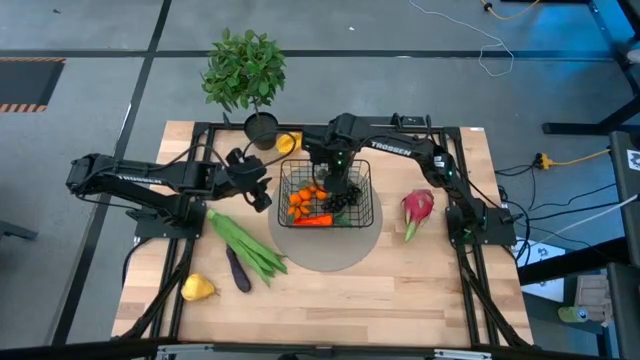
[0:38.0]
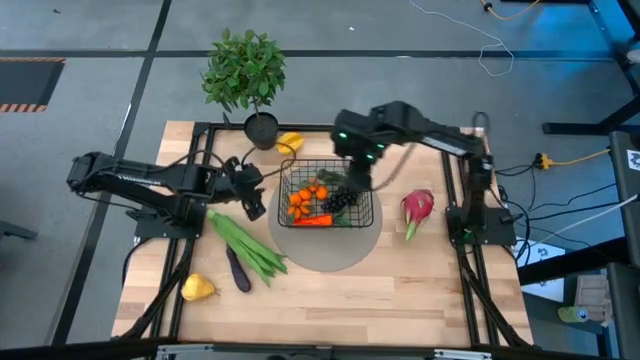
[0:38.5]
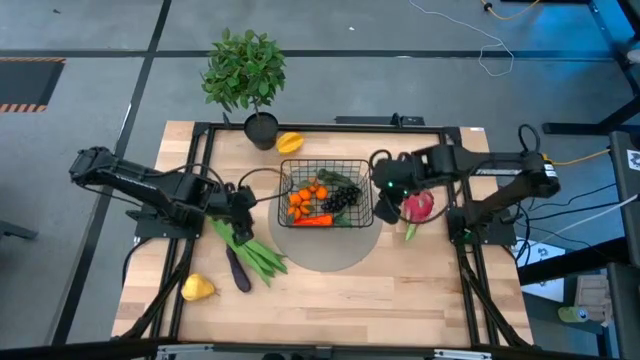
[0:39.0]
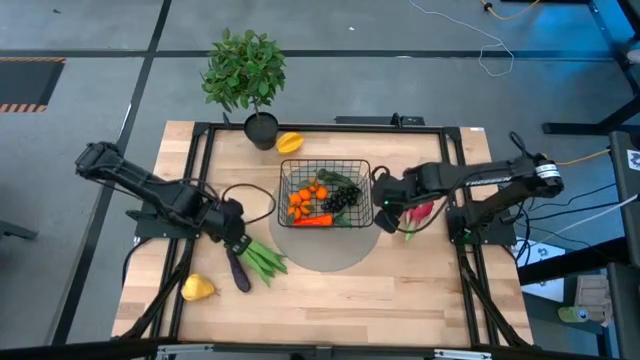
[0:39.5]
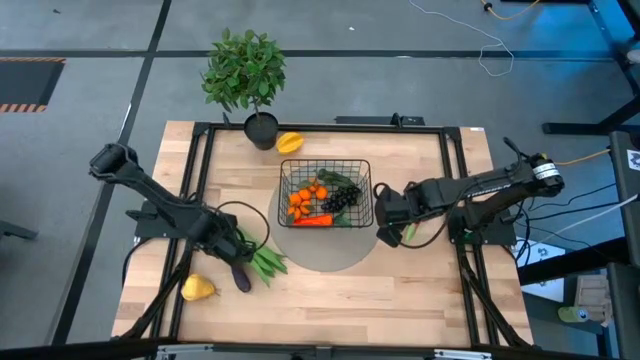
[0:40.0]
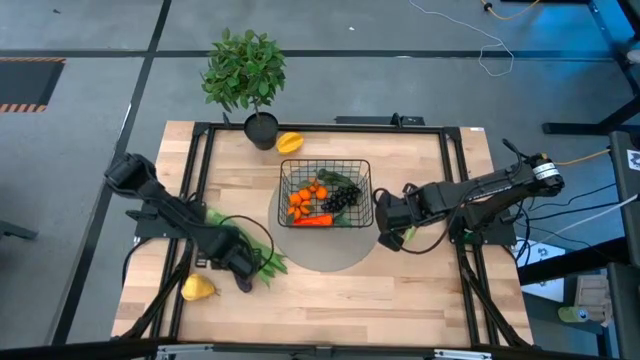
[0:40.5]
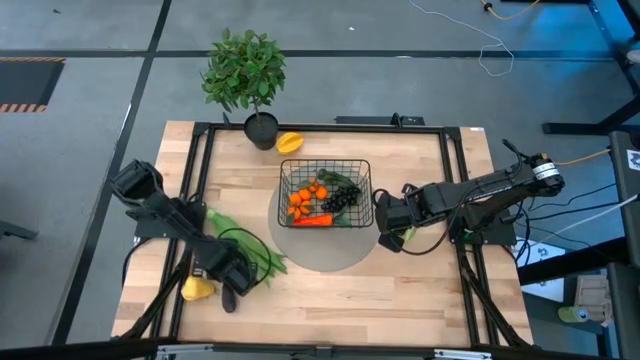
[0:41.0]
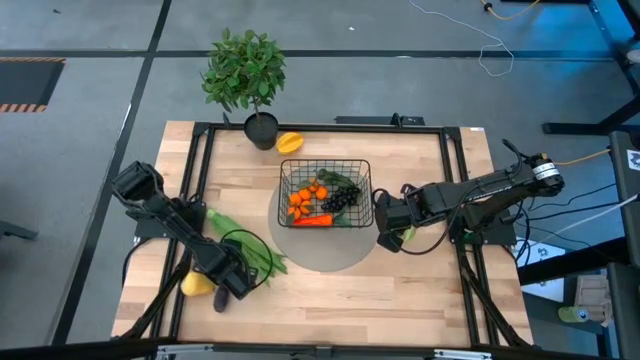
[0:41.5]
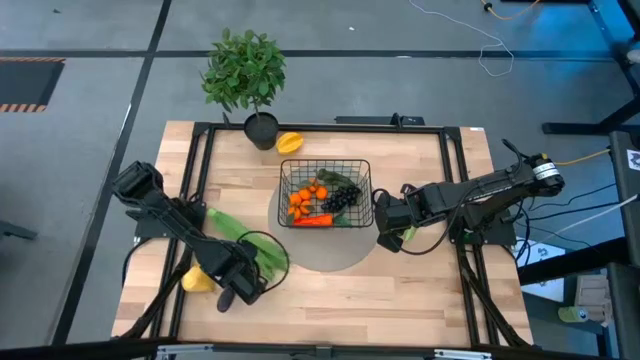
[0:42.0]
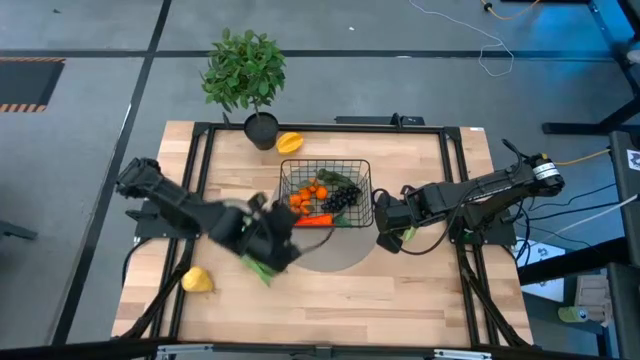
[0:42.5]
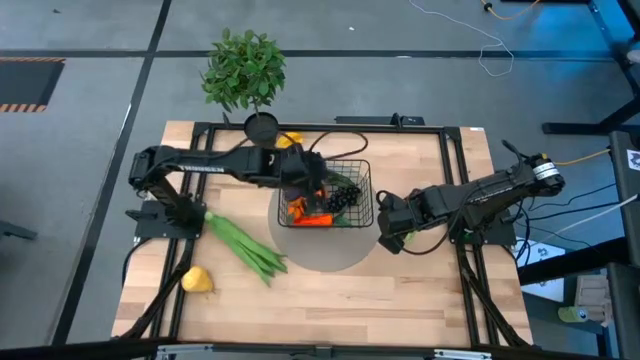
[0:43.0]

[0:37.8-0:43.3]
Task: Build produce basket
Put the eggplant into the black wire basket

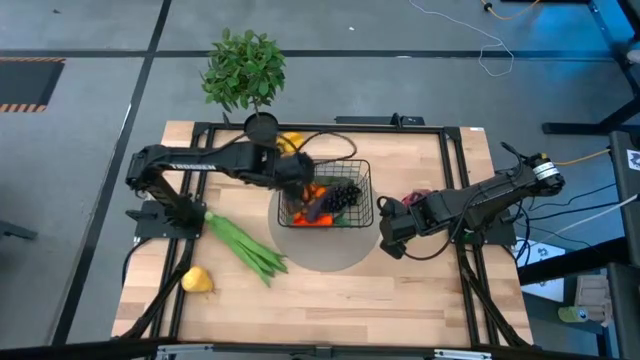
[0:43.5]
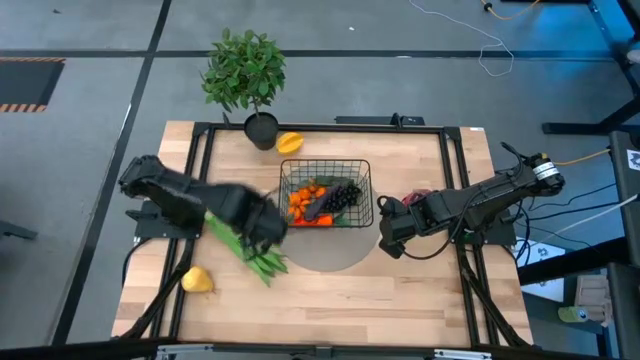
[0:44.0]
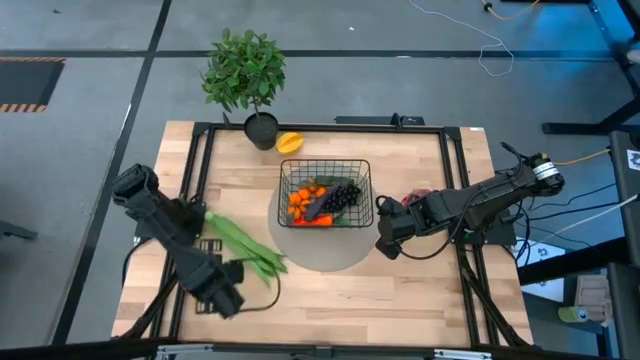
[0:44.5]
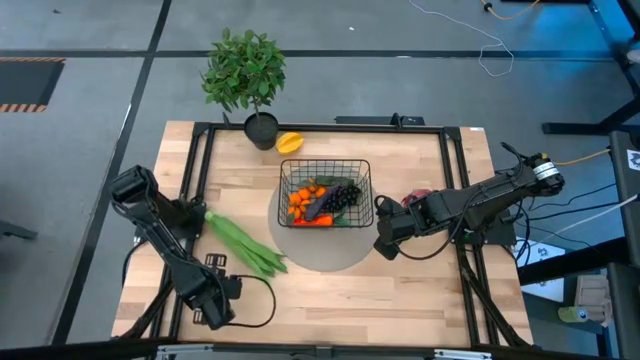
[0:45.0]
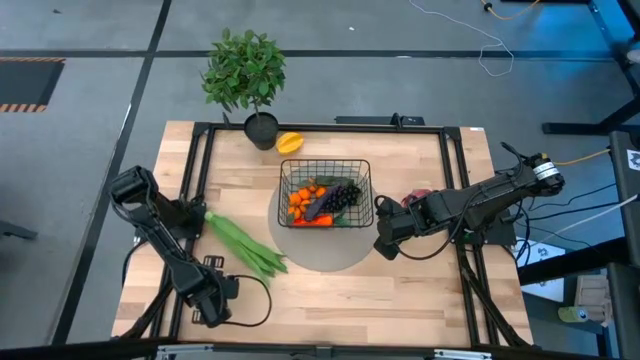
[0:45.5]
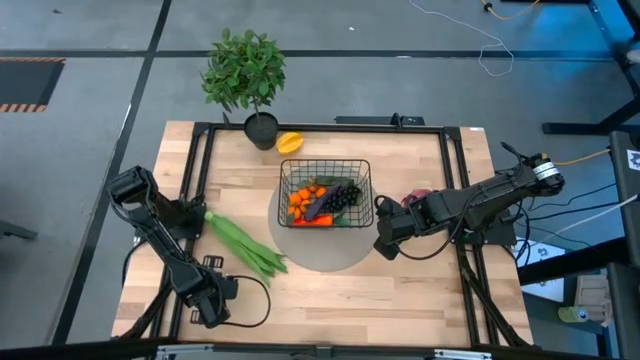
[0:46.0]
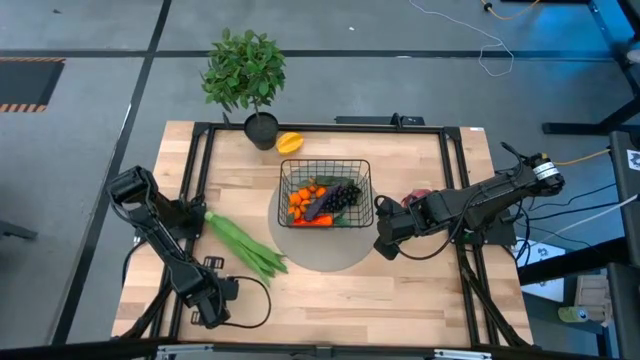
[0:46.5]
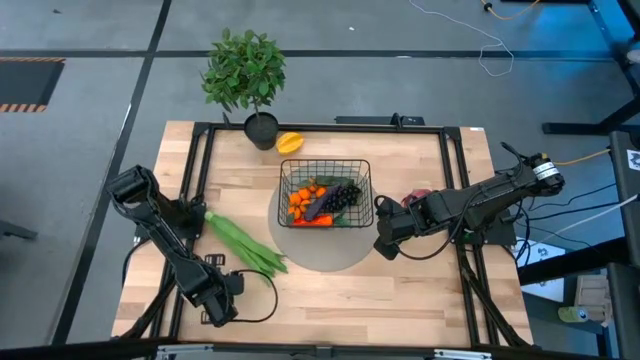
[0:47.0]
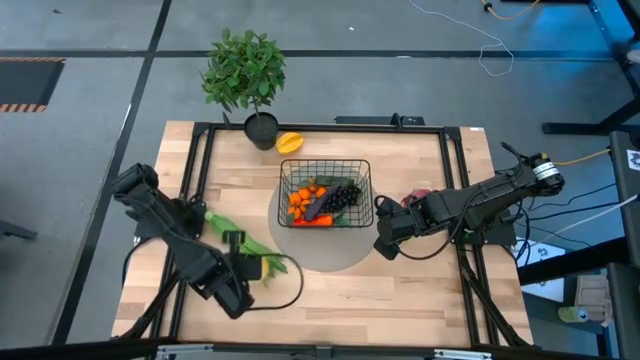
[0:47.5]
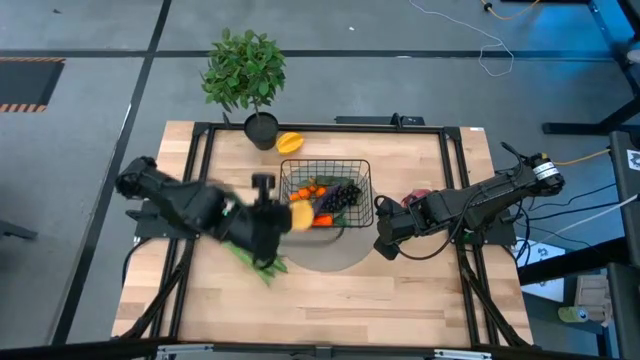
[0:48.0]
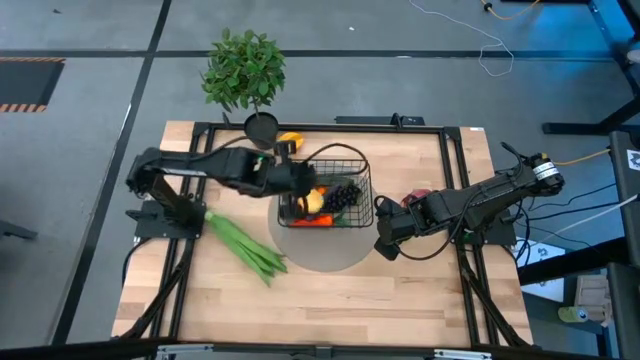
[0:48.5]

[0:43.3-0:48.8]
Put the pear into the black wire basket

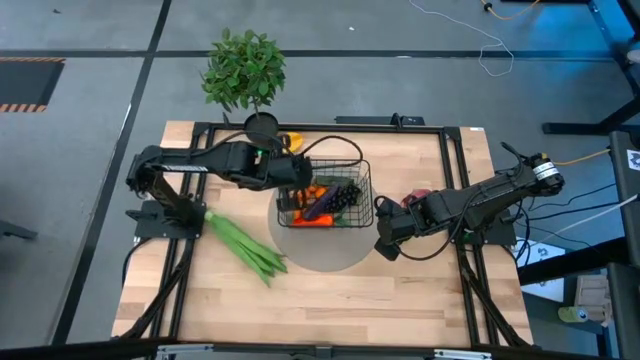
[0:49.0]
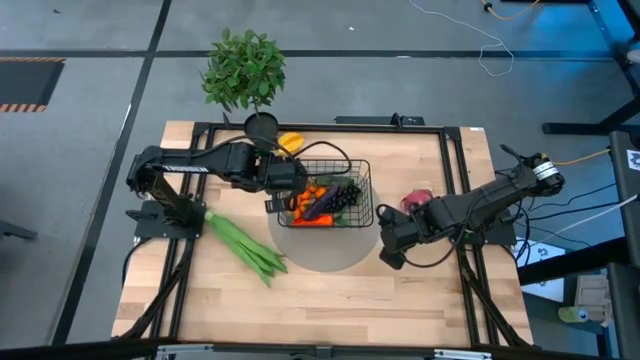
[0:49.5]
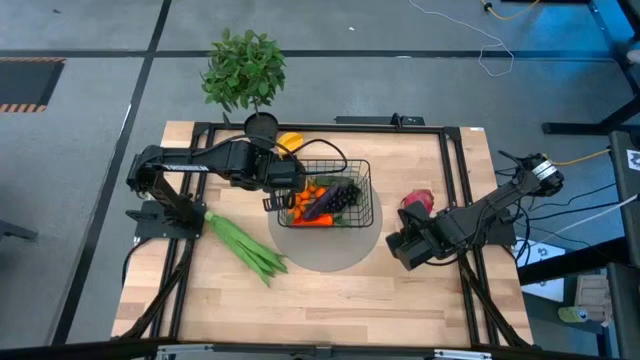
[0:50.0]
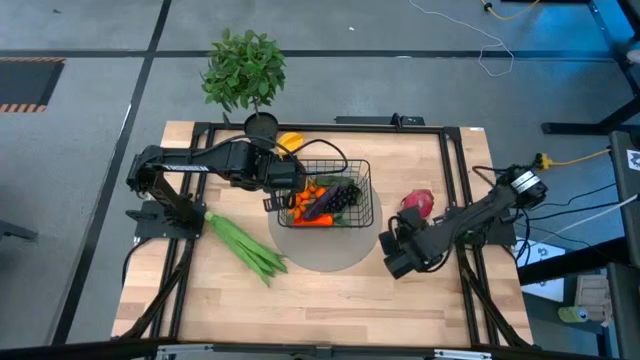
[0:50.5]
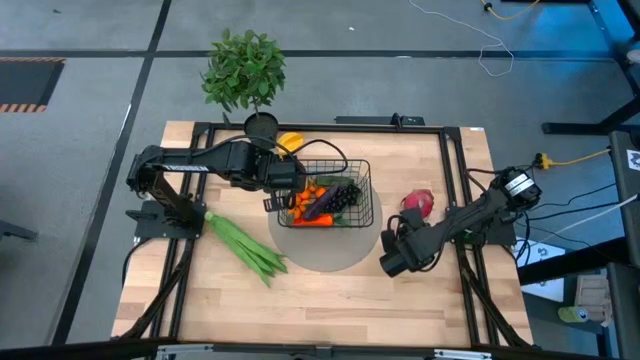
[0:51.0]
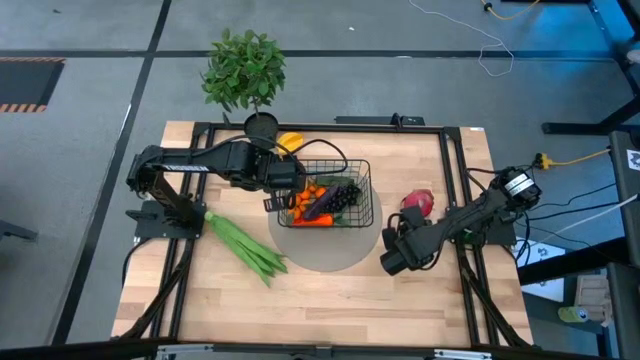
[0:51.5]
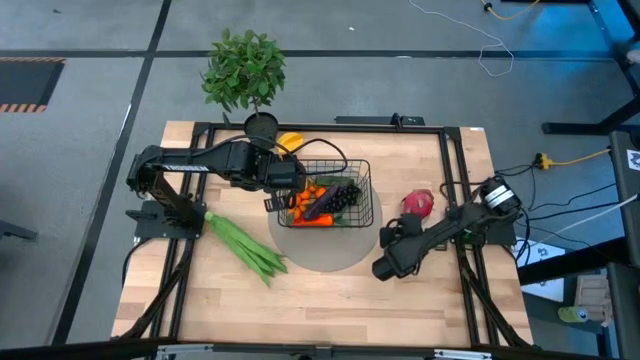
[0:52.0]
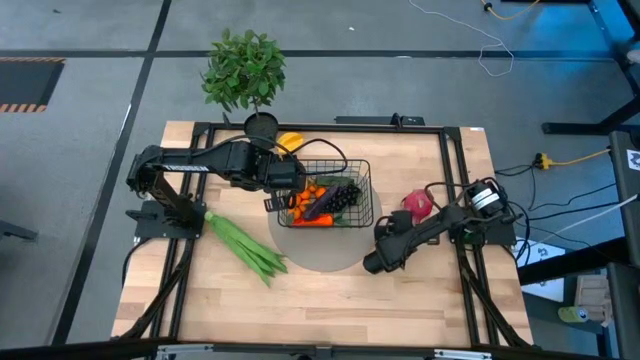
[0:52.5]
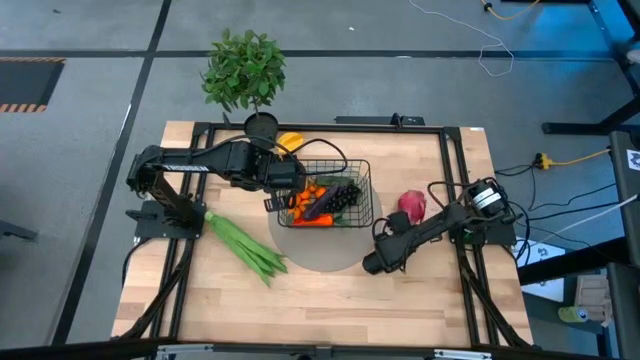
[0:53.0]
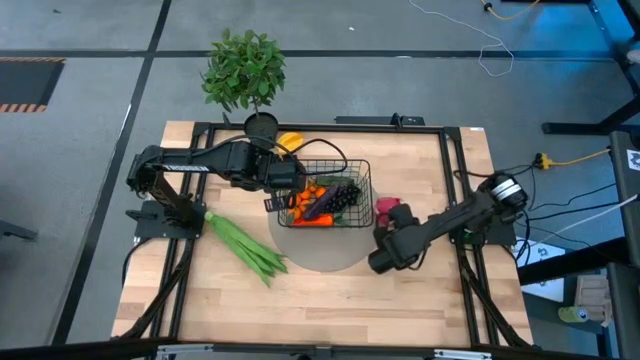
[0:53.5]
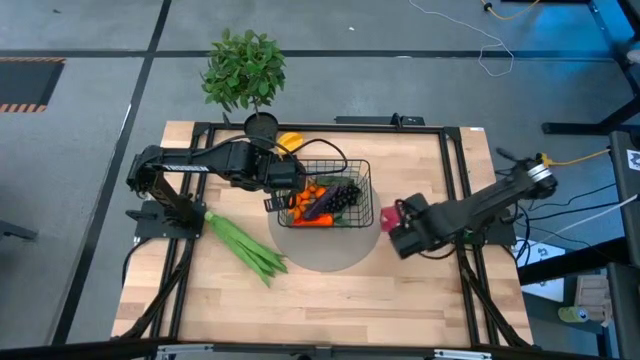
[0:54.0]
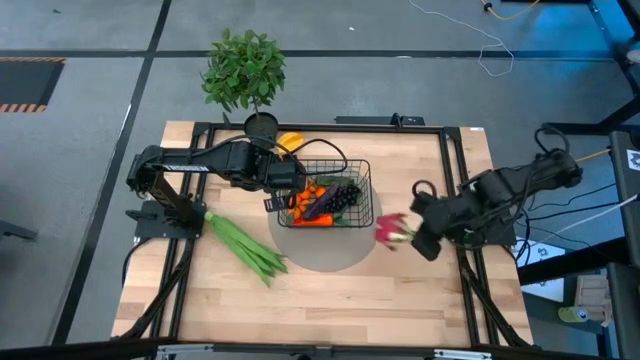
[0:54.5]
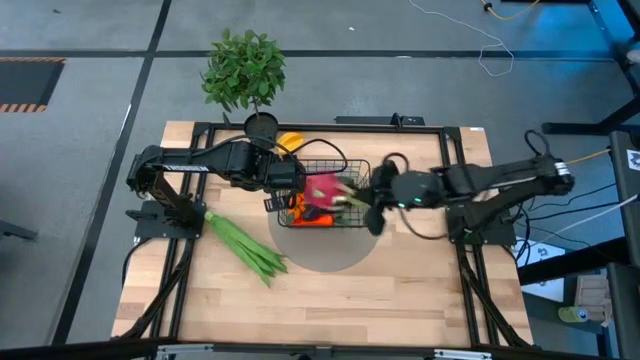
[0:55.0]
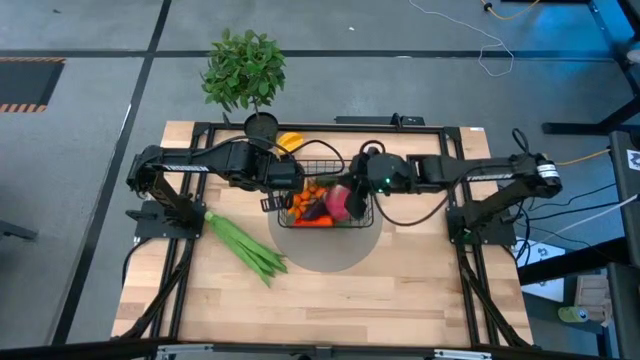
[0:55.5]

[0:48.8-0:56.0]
Put the dragon fruit into the black wire basket

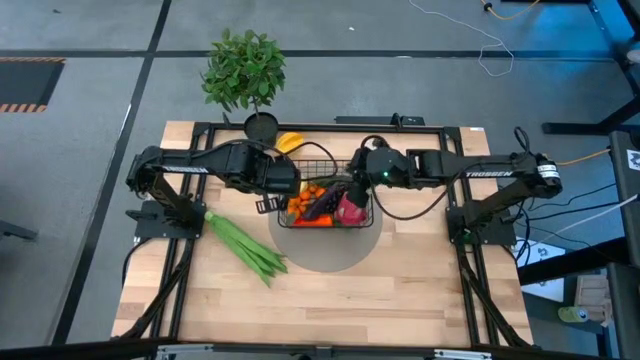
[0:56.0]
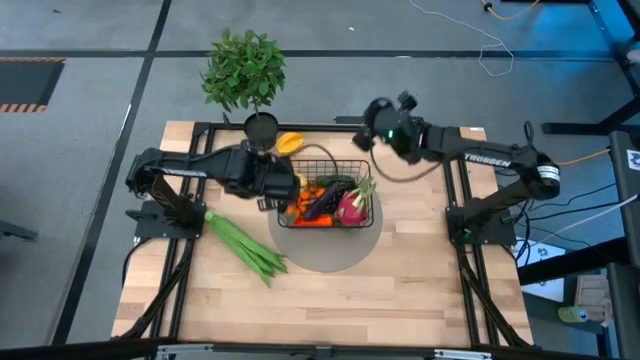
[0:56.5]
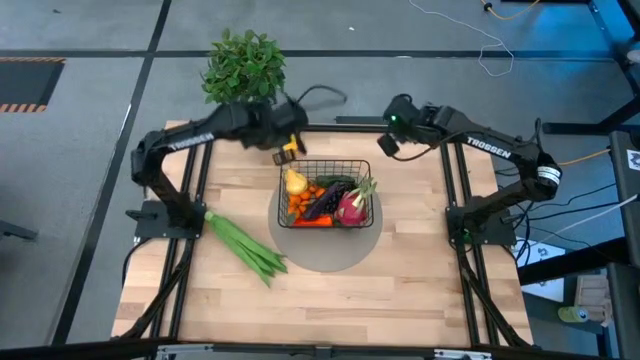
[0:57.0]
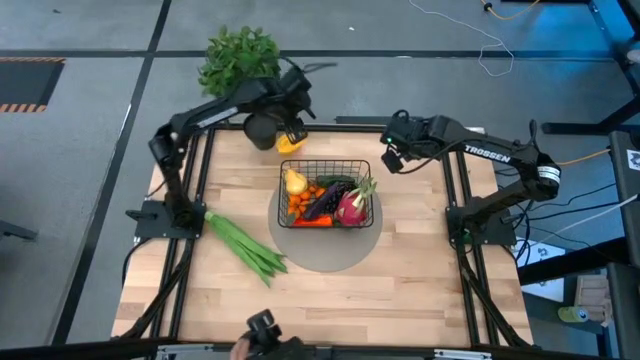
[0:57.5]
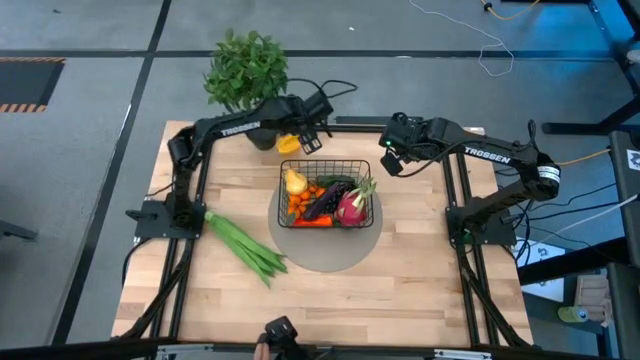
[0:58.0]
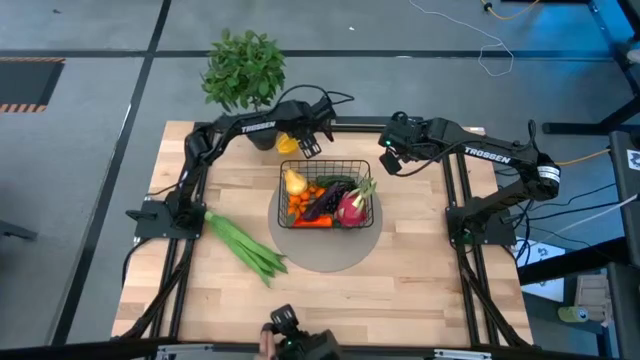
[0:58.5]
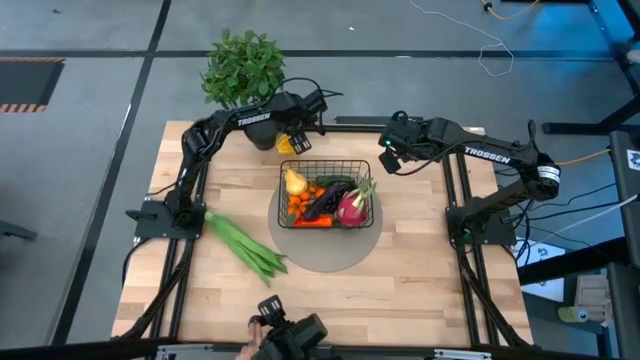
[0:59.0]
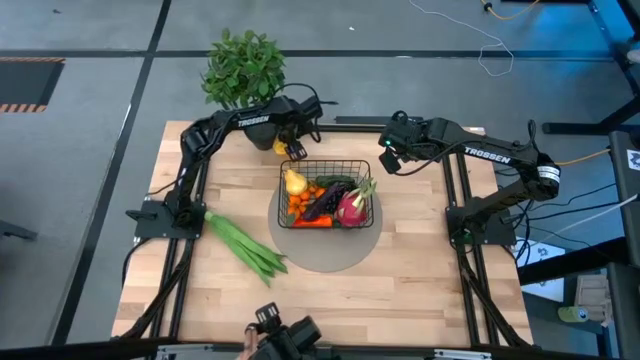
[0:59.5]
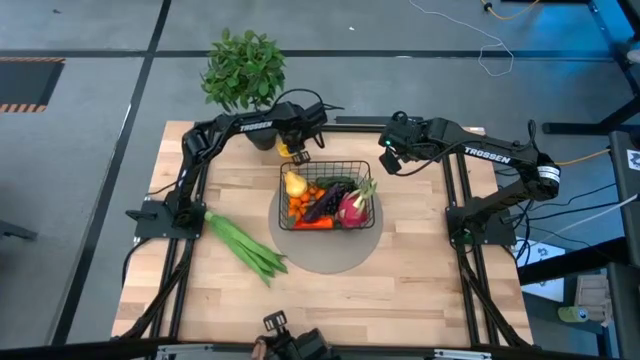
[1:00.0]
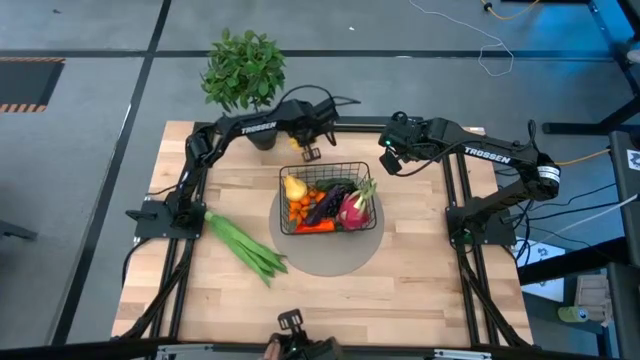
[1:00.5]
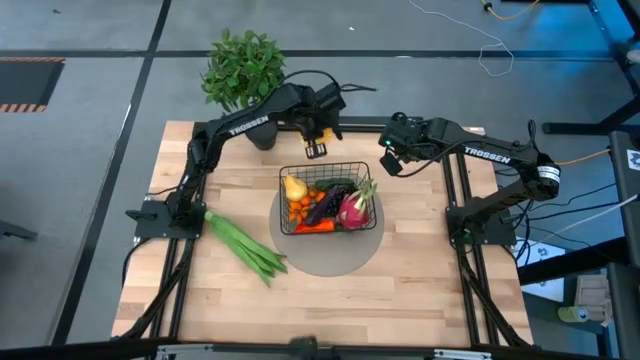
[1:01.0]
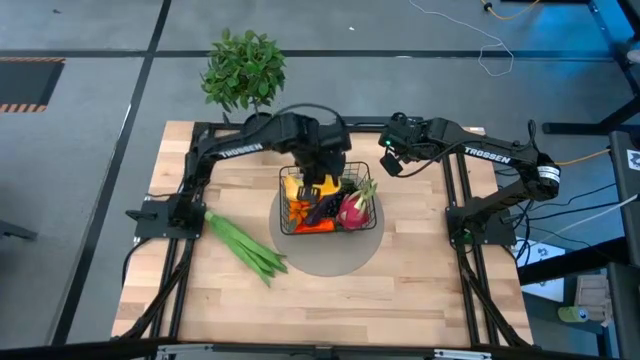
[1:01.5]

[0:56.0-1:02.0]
Put the star fruit into the black wire basket
